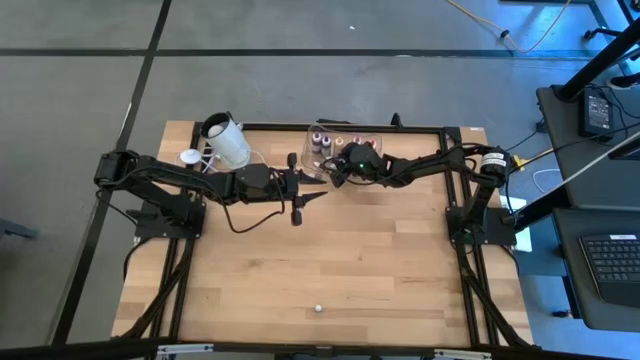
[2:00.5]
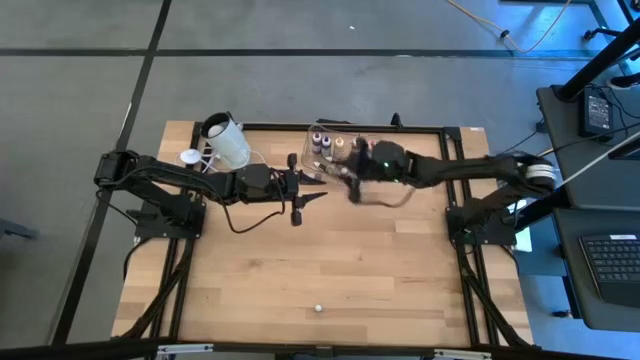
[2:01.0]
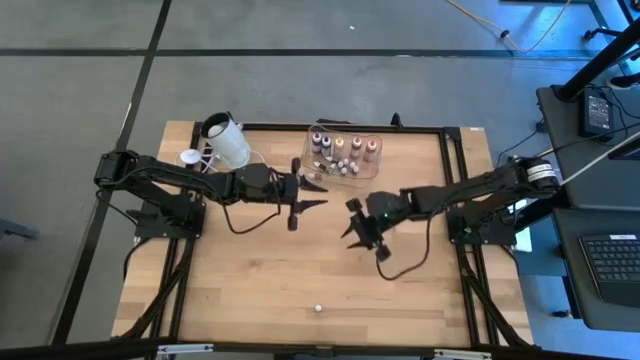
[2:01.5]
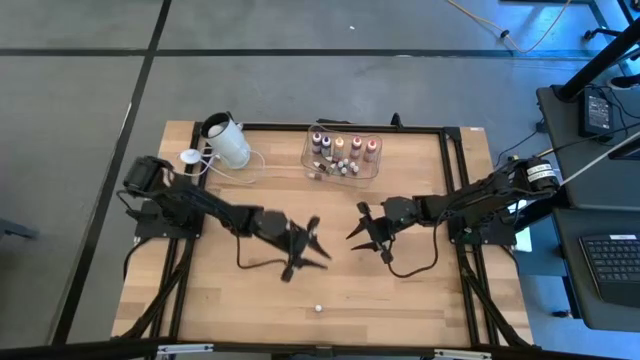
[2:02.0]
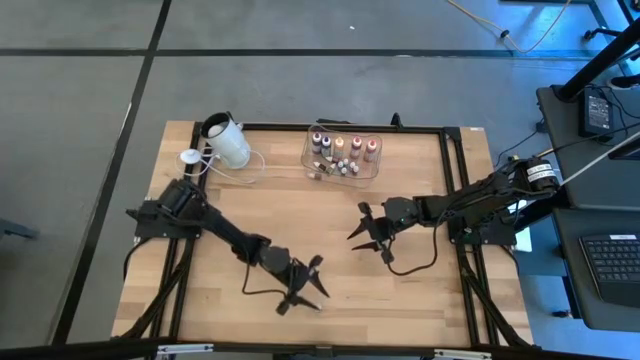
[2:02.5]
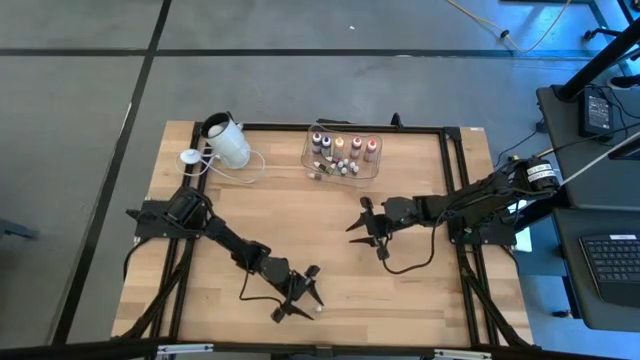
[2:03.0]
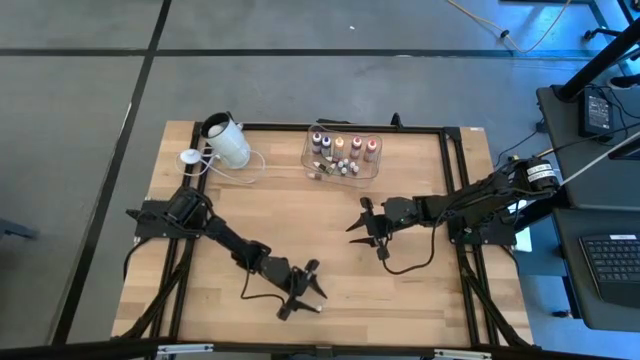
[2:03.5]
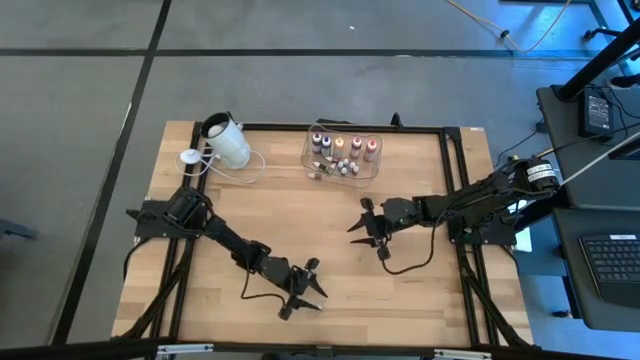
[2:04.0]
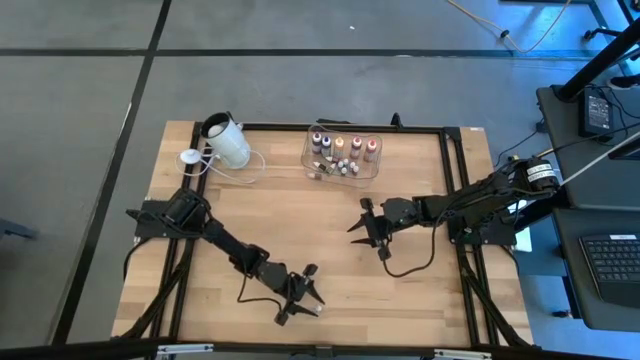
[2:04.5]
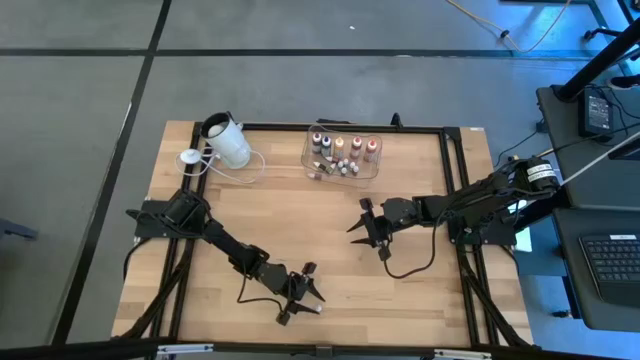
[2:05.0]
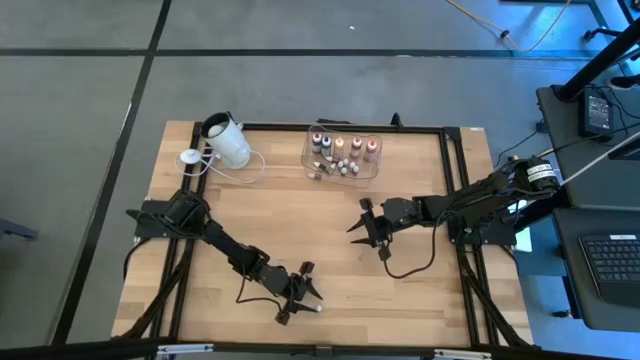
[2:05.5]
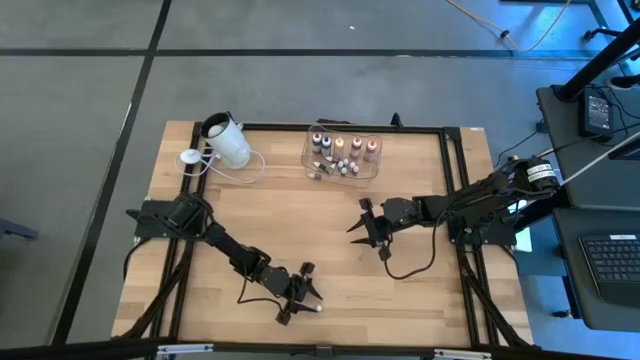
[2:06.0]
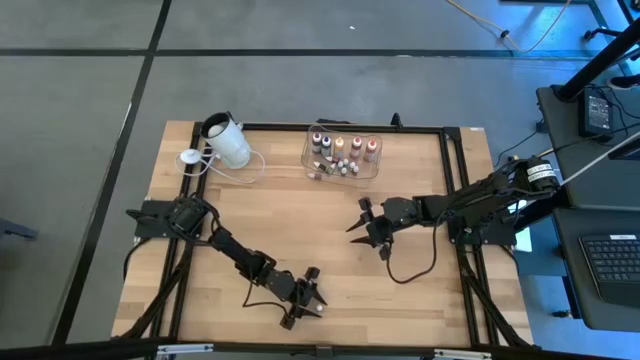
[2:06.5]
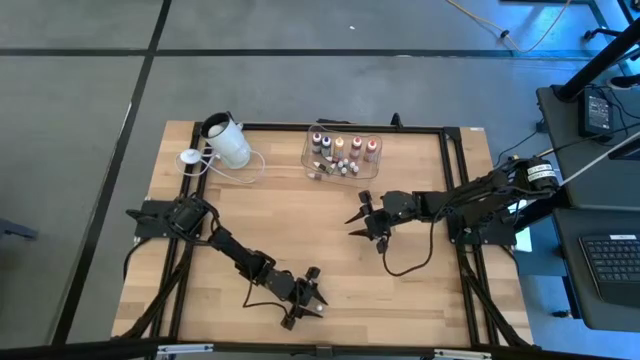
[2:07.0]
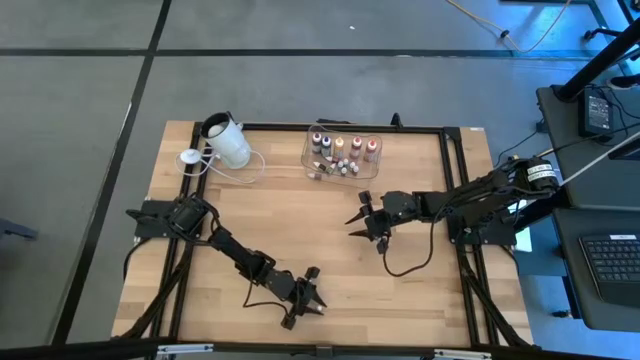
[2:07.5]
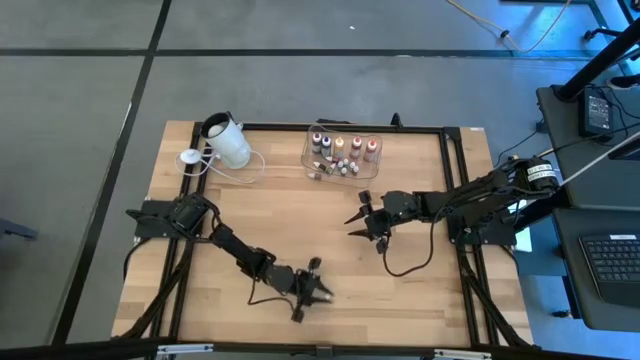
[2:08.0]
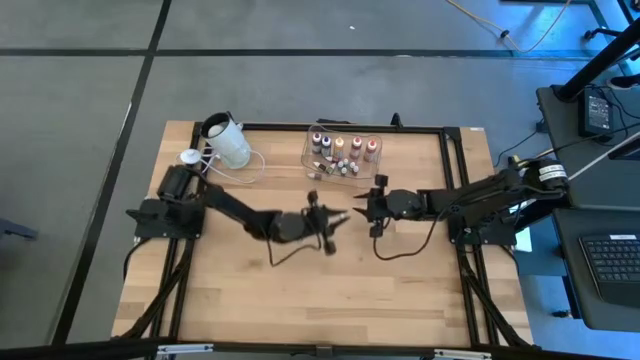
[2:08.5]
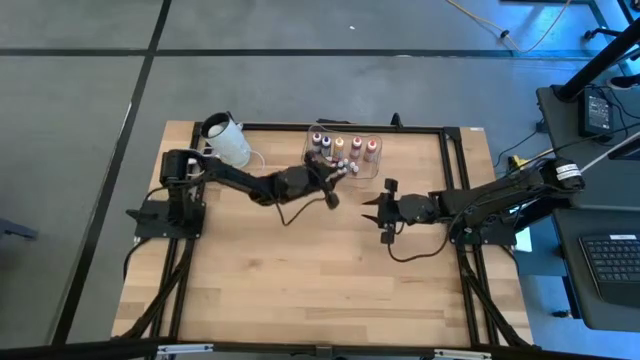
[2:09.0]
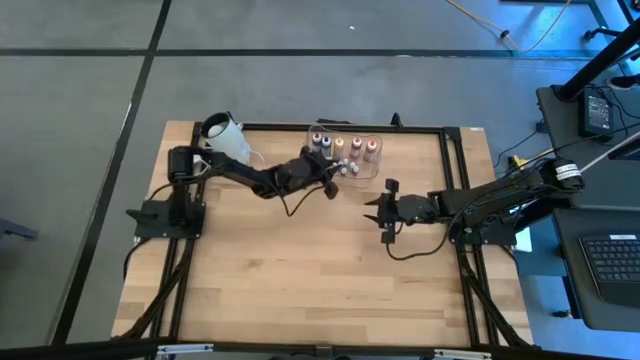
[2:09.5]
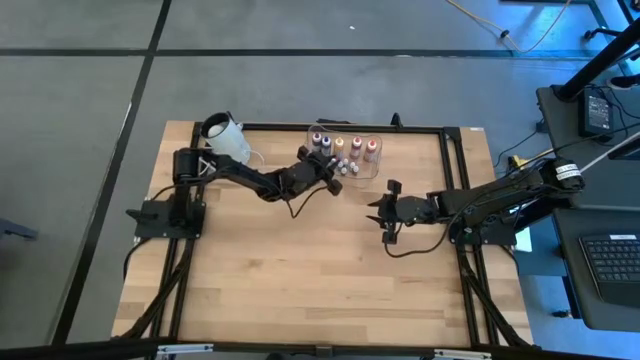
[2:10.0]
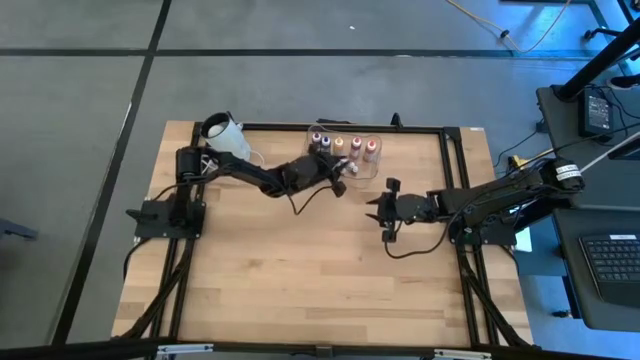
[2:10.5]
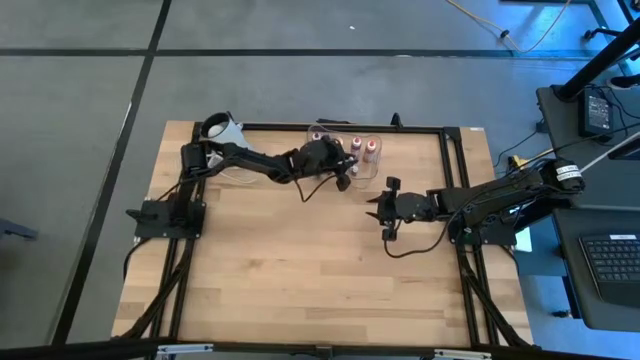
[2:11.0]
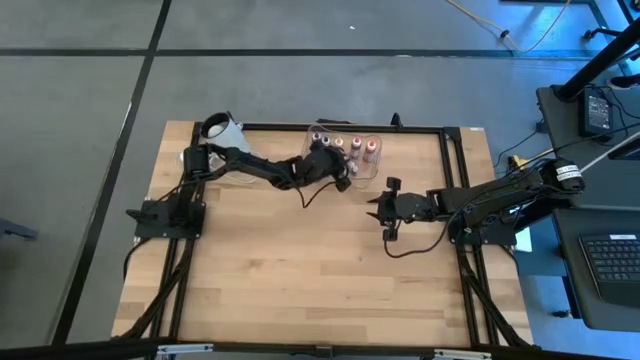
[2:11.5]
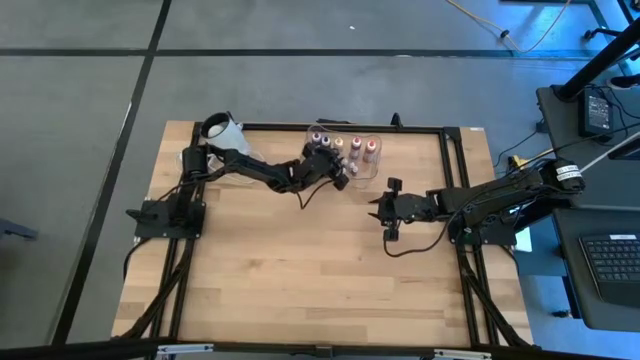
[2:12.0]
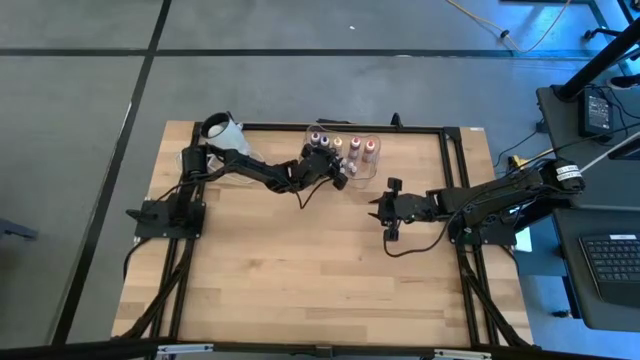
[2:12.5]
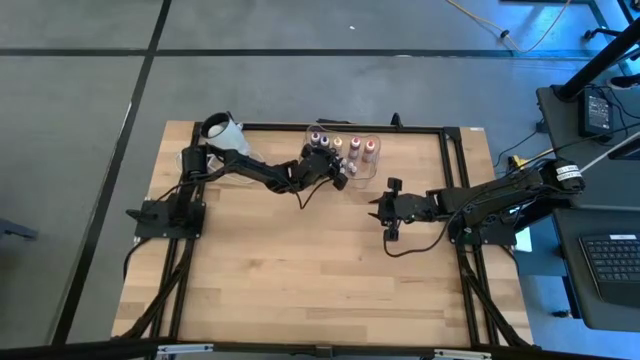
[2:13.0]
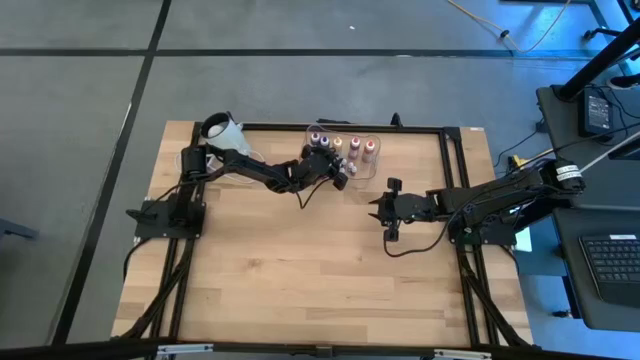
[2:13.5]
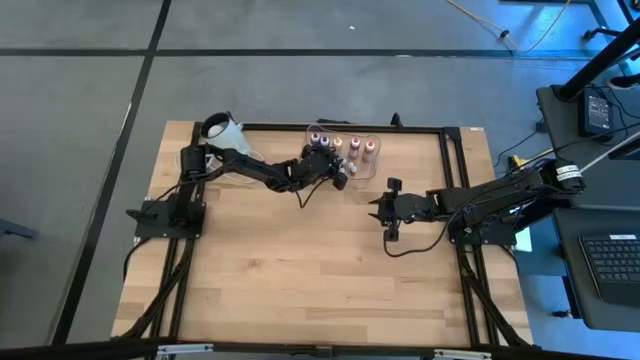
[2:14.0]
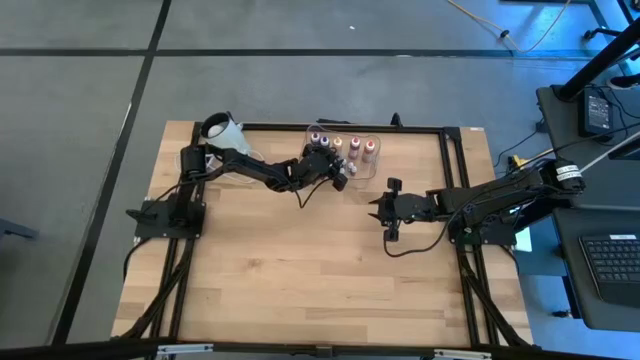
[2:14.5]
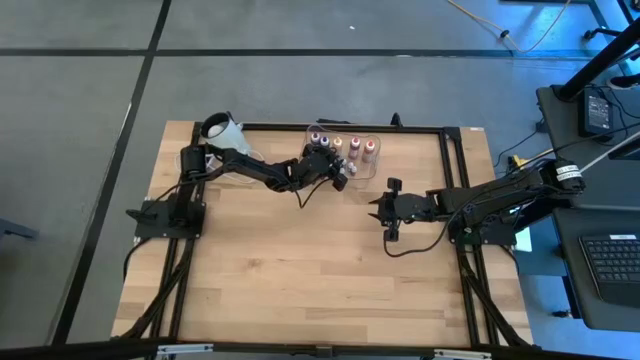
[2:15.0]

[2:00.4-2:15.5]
Task: Pick & Place food coloring
Put the small red food coloring bottle into the transparent container

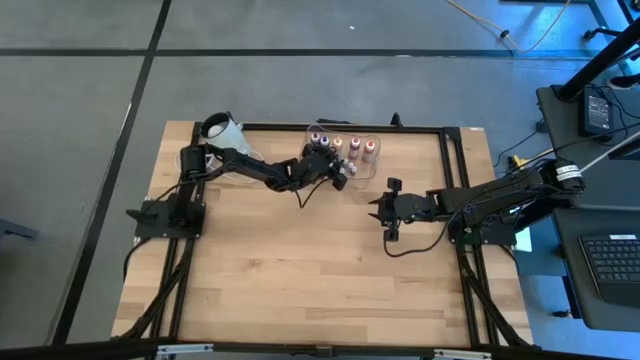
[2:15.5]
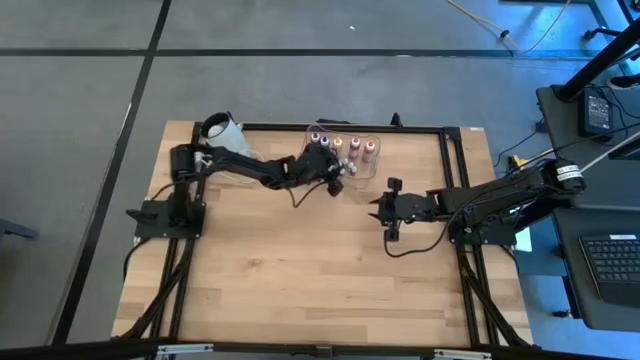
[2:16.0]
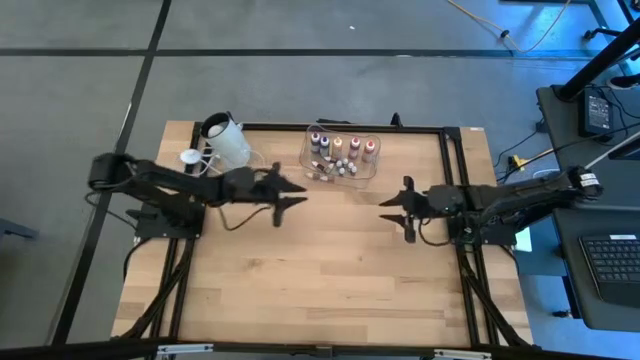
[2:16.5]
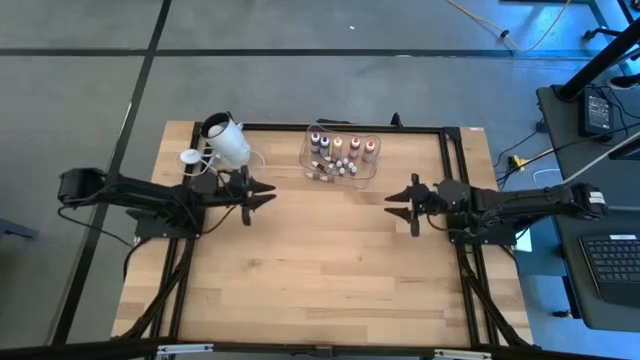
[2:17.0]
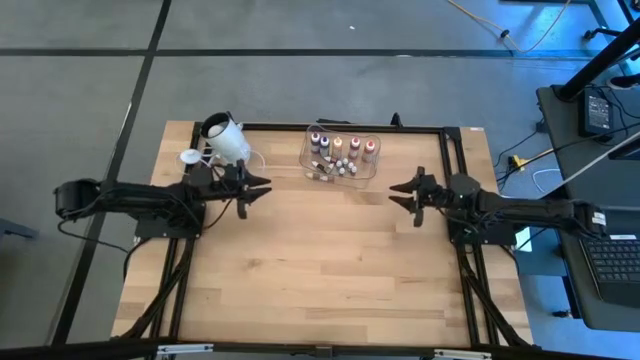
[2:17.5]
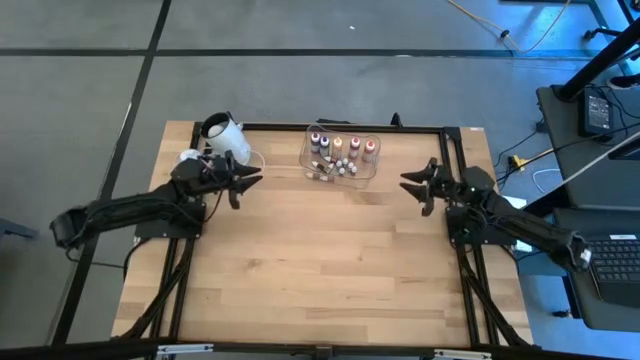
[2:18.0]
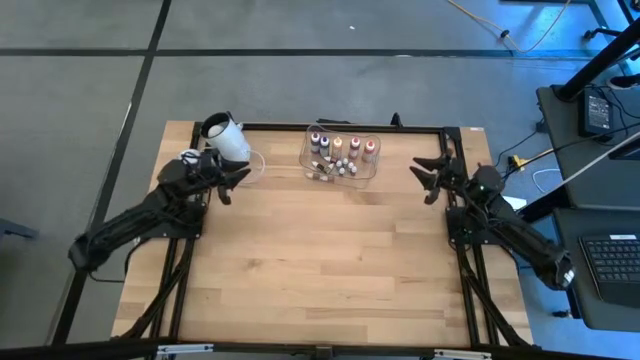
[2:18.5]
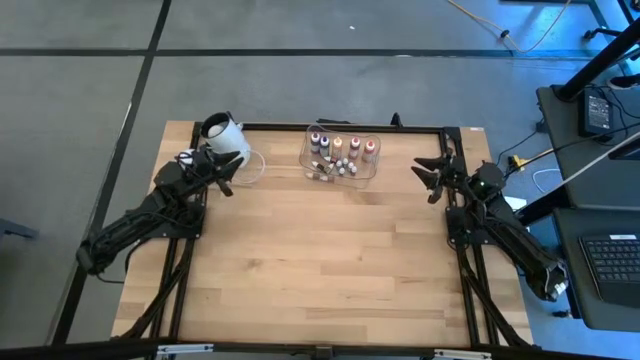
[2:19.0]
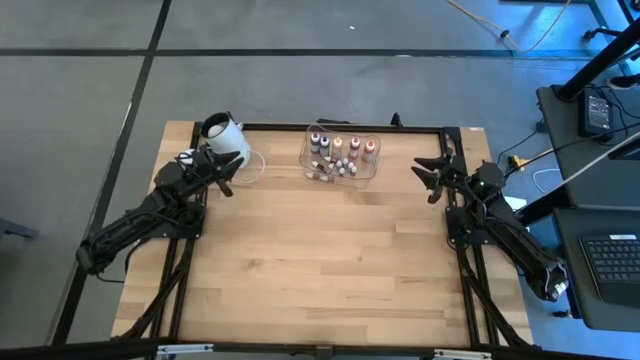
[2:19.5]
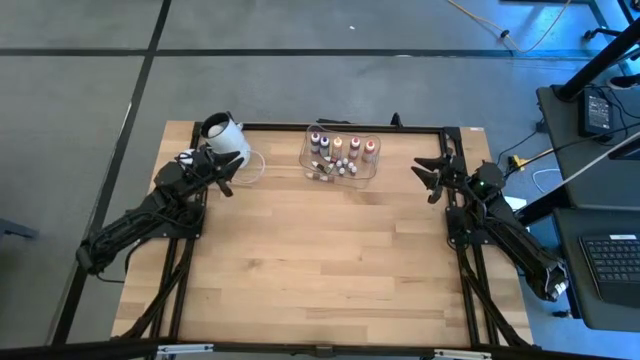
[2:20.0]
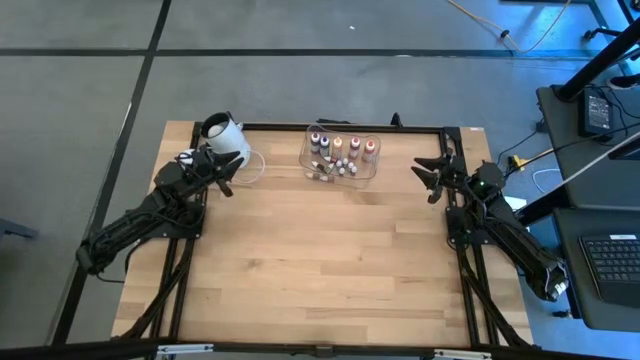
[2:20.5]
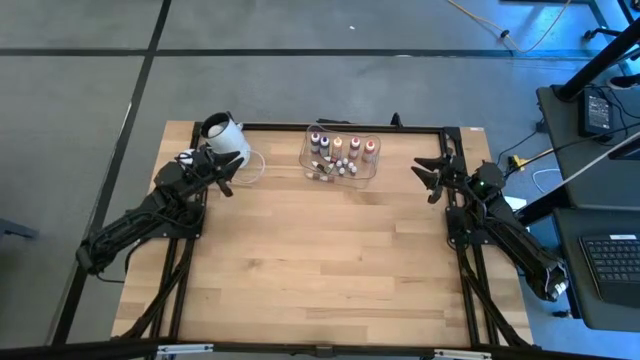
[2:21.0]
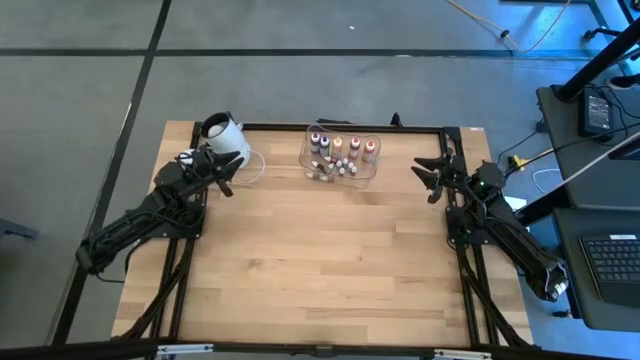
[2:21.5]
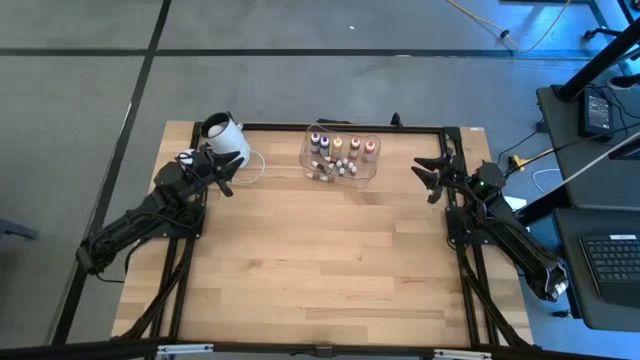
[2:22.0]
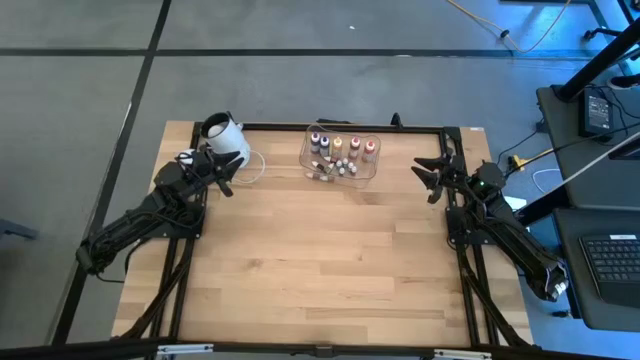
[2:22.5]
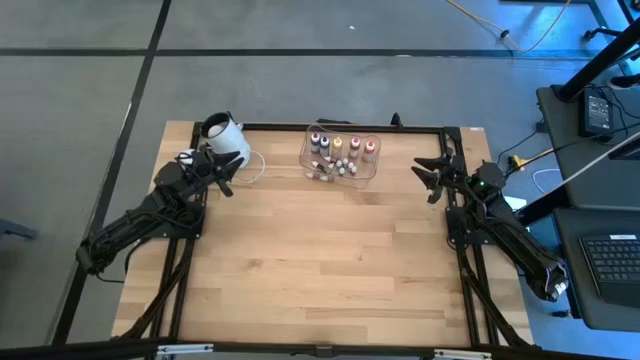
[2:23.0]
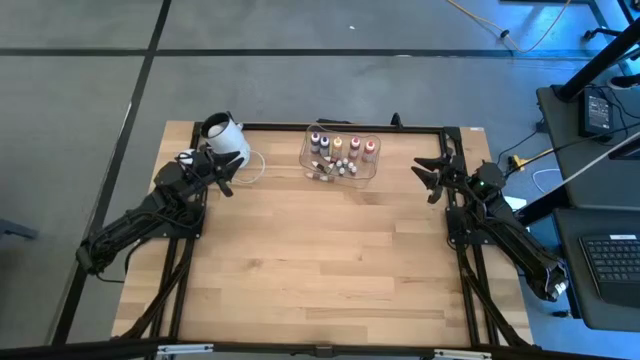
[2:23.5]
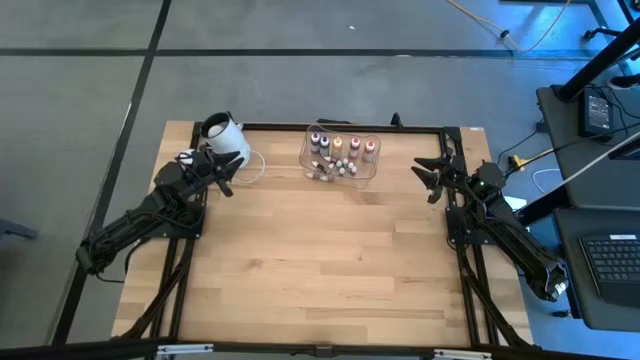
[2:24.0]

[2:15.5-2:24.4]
Return to Home Position
